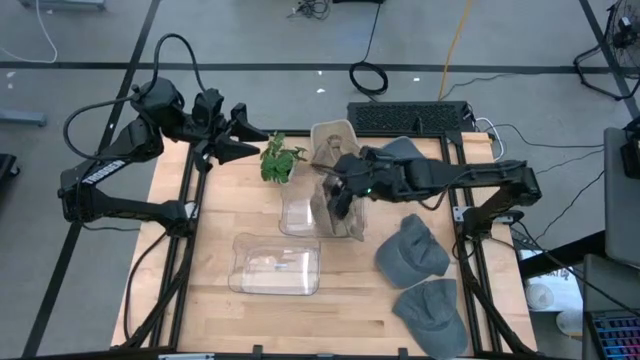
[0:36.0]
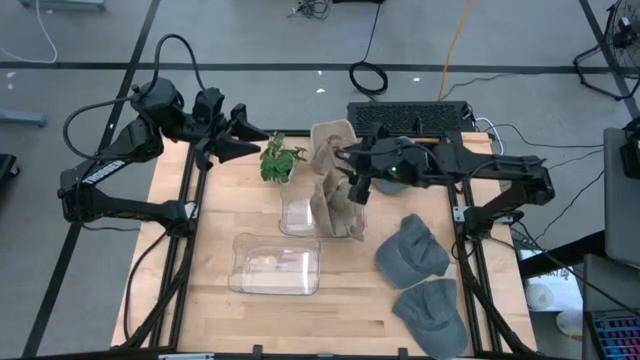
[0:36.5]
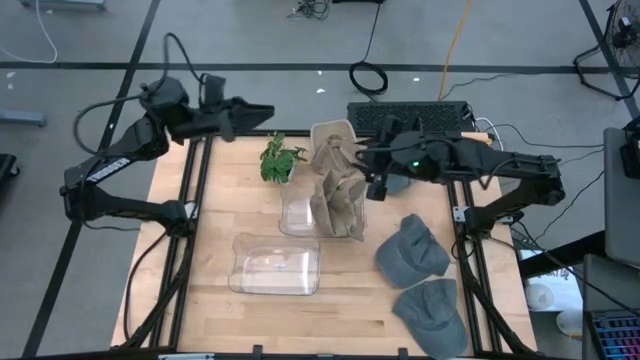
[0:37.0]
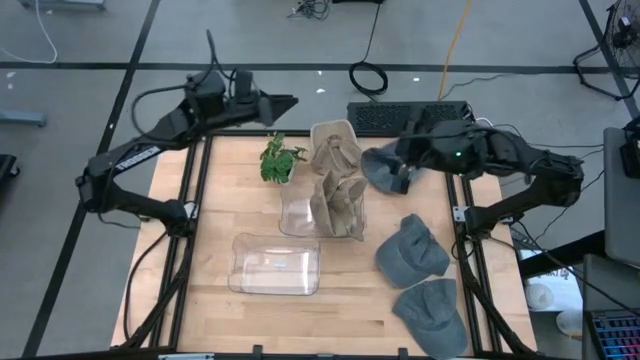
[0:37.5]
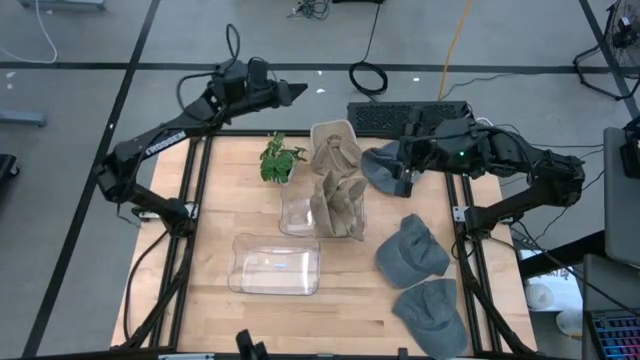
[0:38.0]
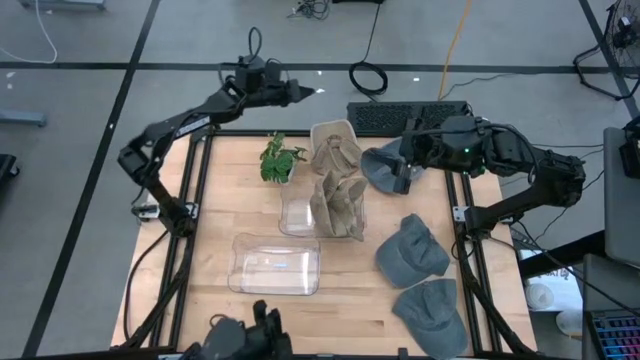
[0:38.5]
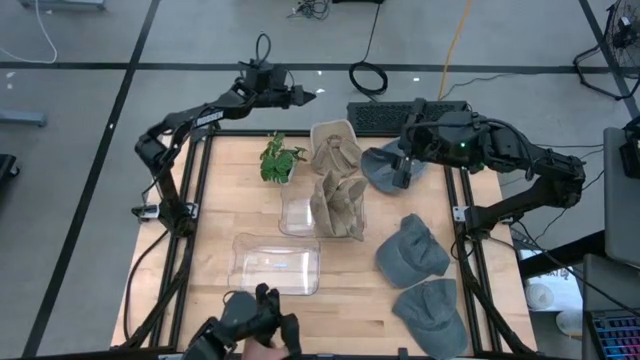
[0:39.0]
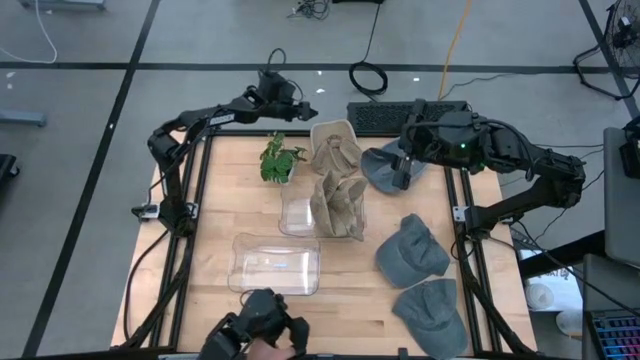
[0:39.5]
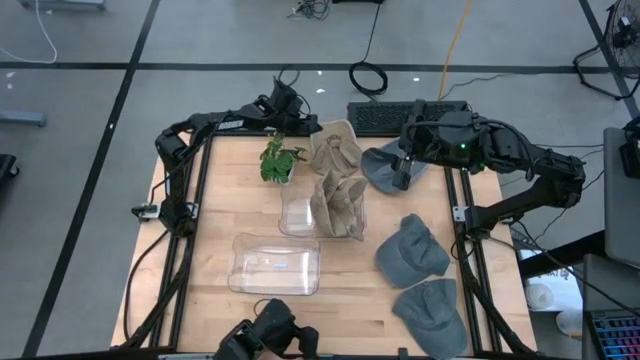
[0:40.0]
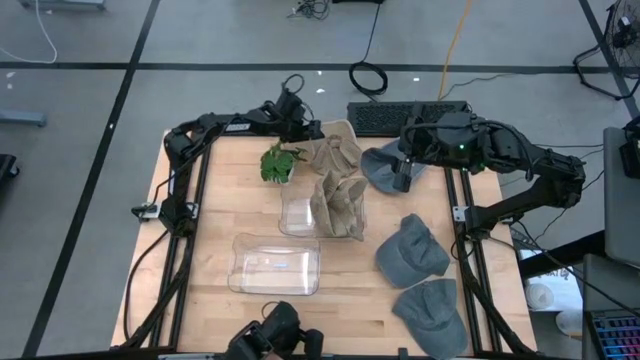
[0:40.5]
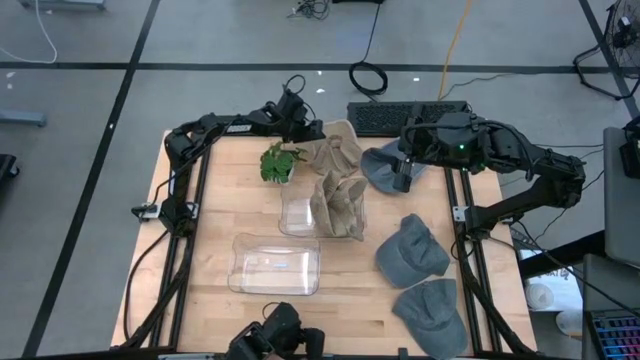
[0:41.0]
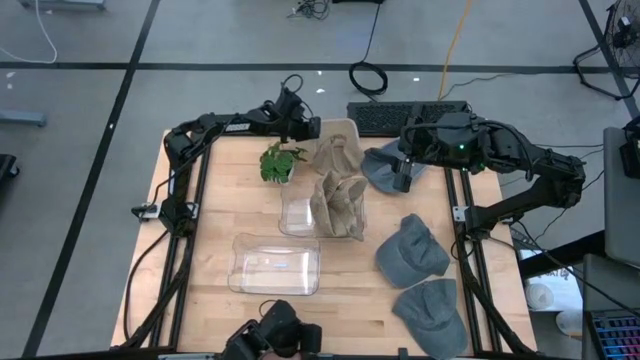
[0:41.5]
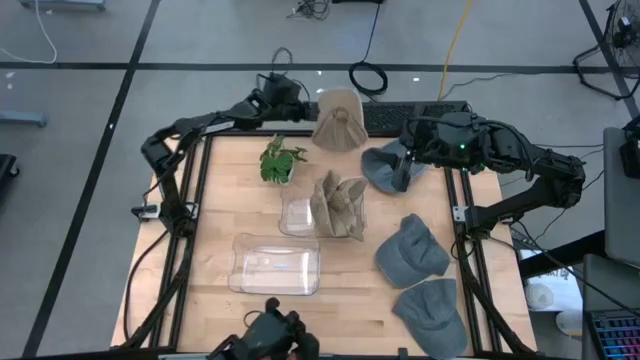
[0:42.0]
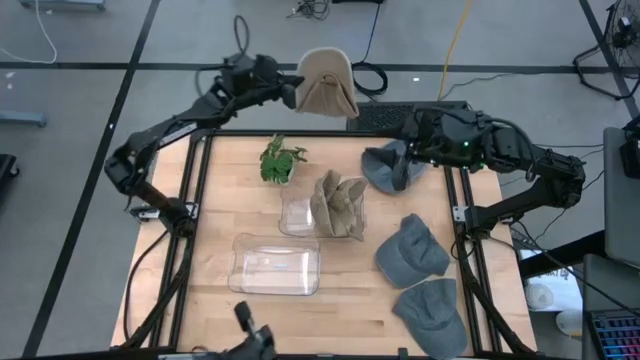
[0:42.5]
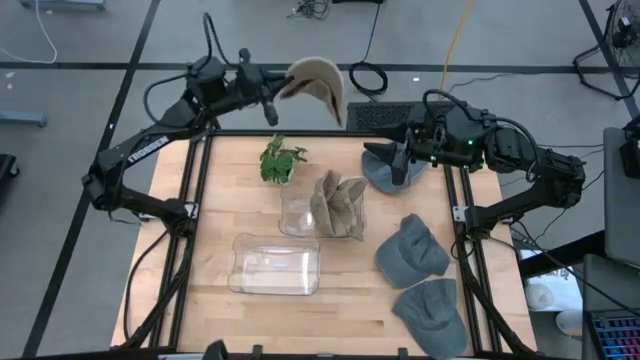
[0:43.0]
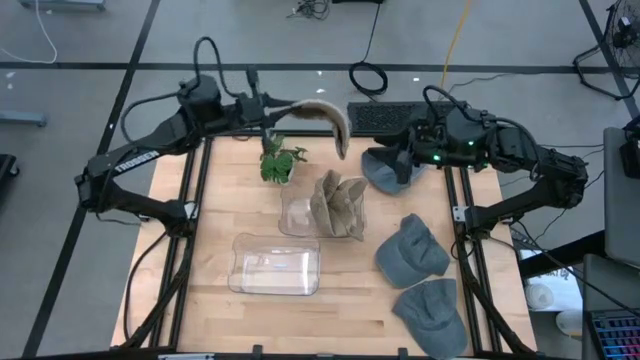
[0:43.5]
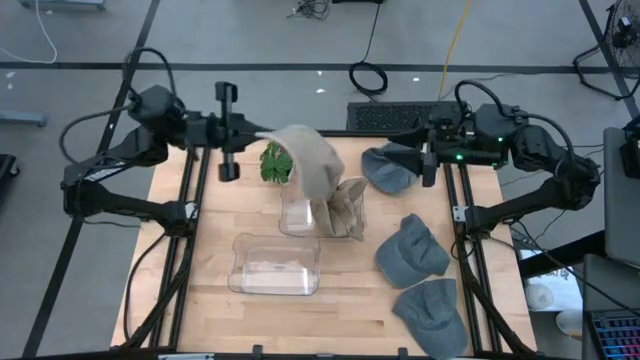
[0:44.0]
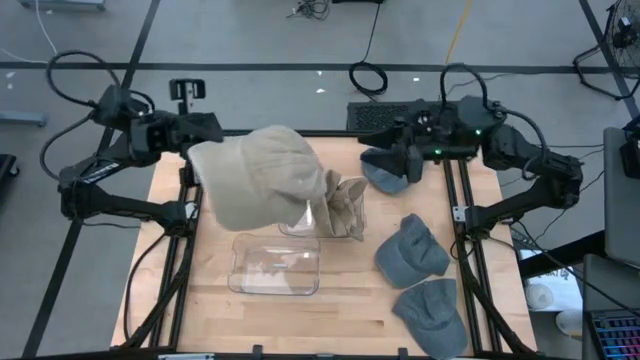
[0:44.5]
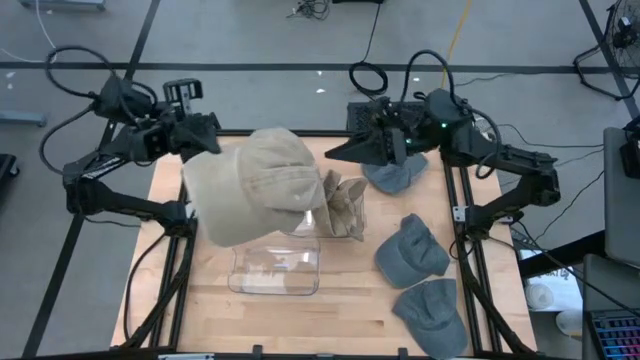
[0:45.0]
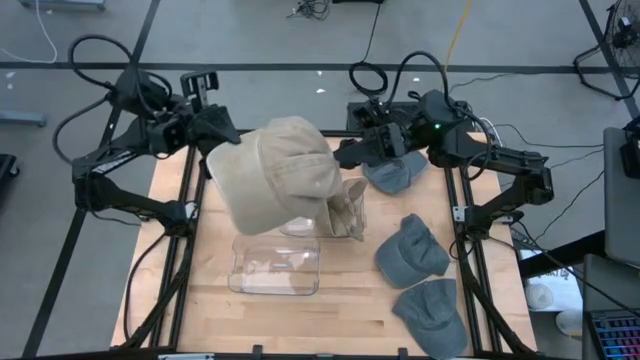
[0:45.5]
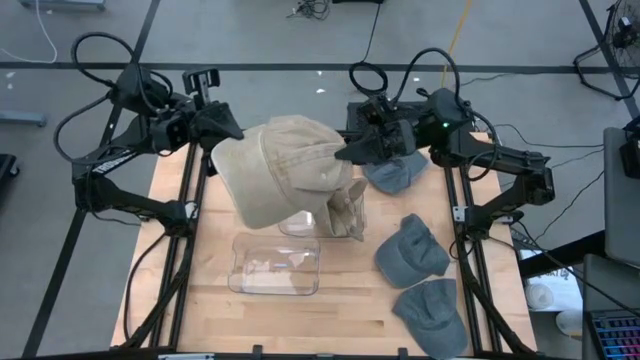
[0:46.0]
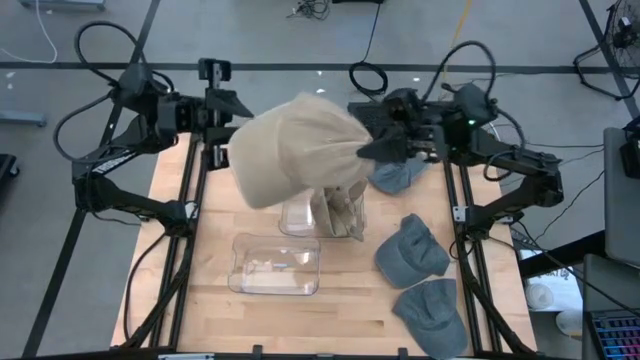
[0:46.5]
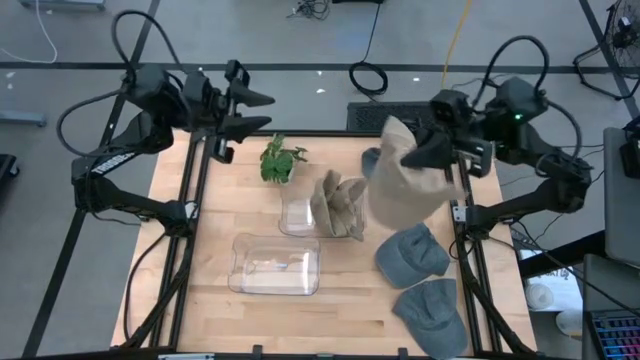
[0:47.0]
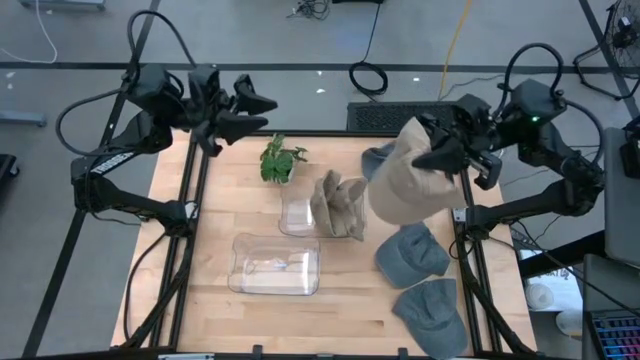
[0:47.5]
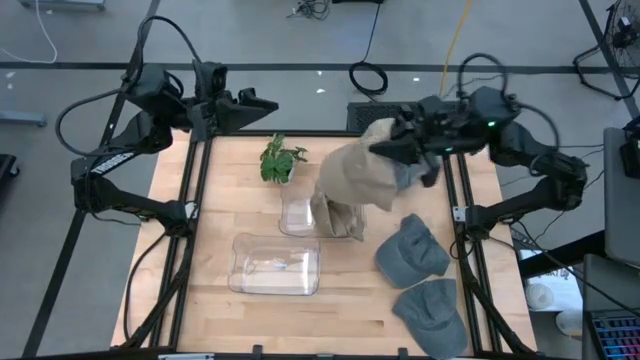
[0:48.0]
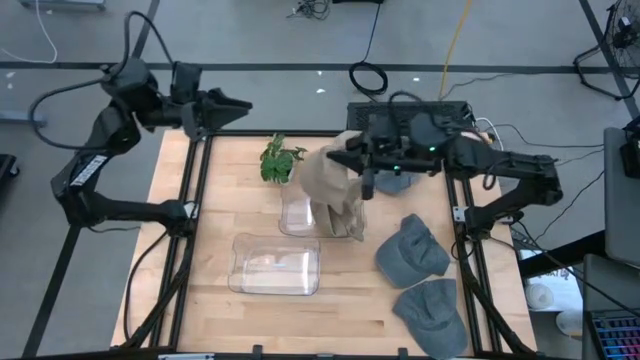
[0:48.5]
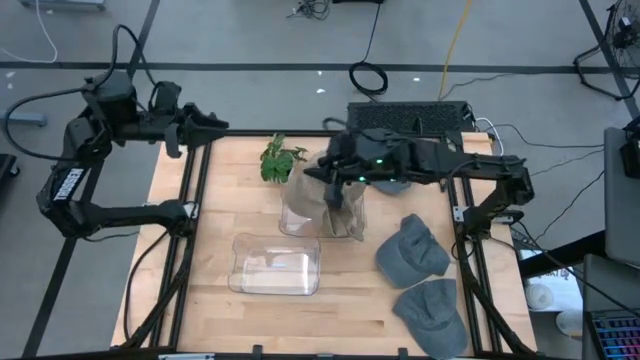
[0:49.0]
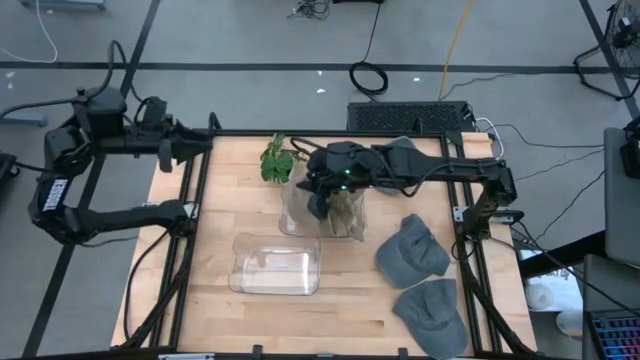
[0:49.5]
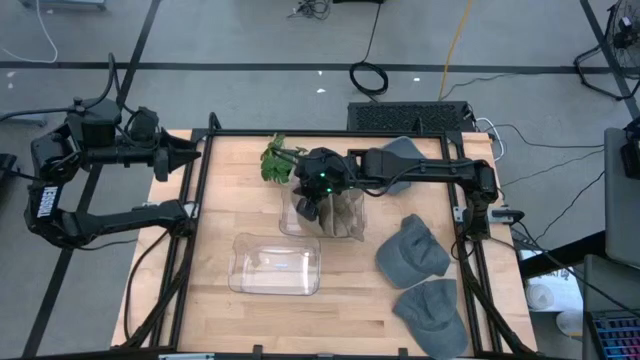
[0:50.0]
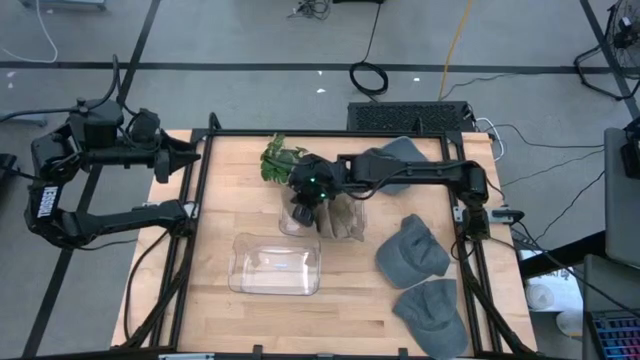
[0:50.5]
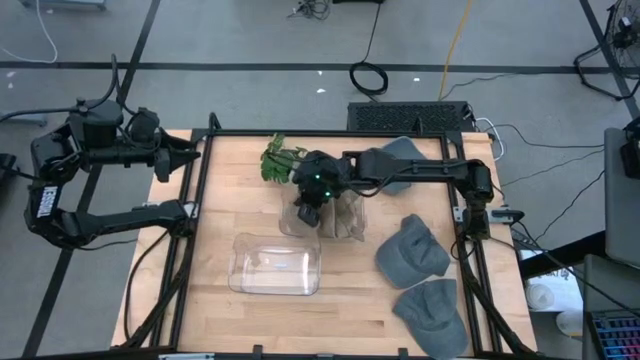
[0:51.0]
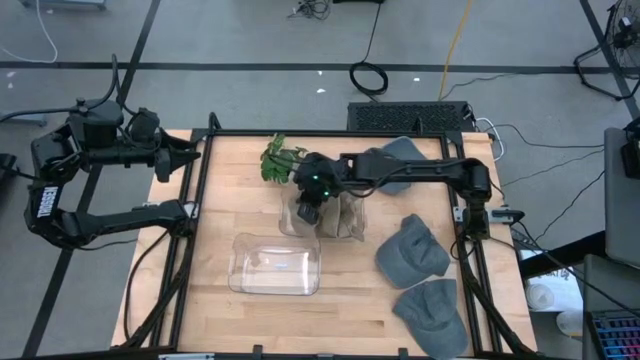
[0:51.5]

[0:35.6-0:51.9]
Task: Pick & Place hat
Put the brown cap into the top transparent bin
